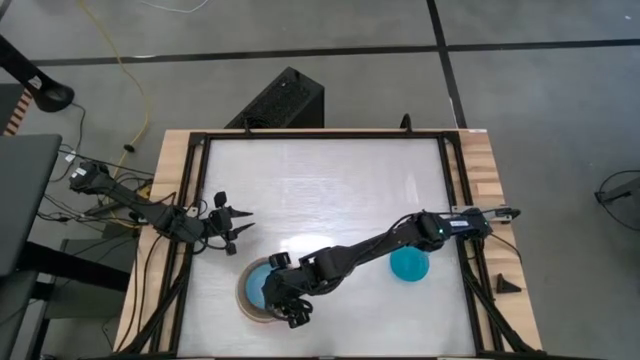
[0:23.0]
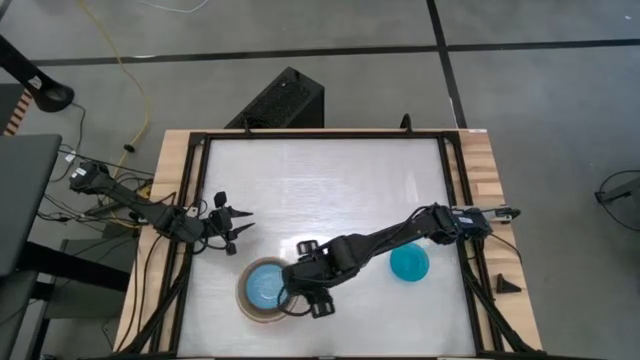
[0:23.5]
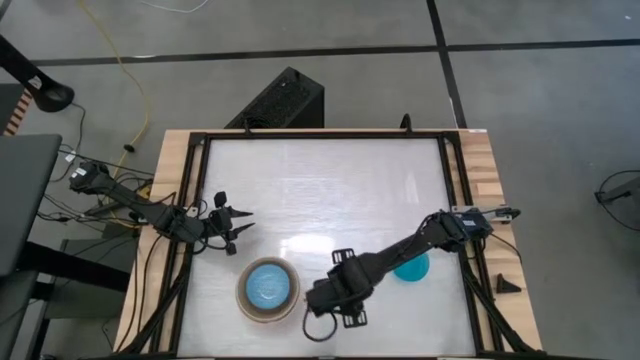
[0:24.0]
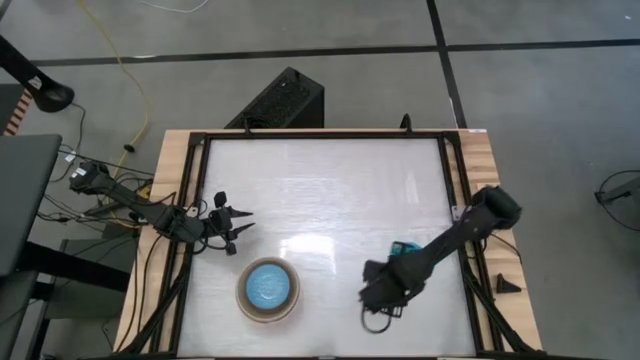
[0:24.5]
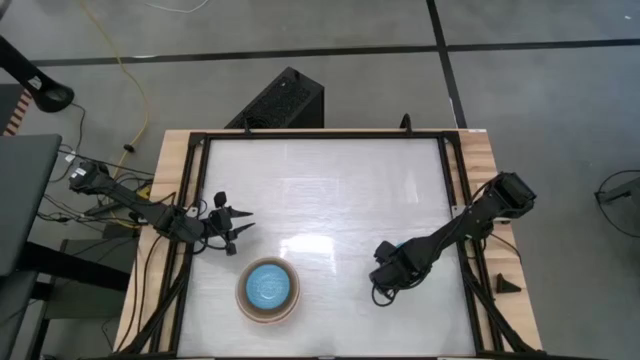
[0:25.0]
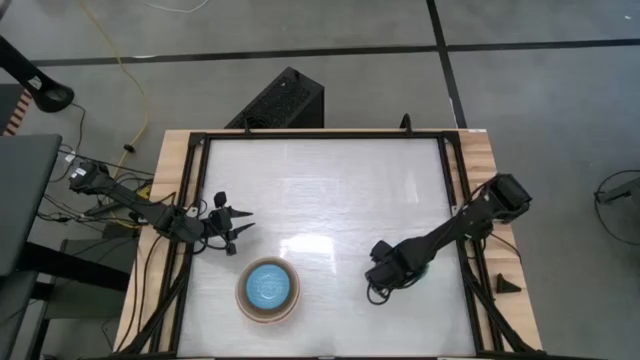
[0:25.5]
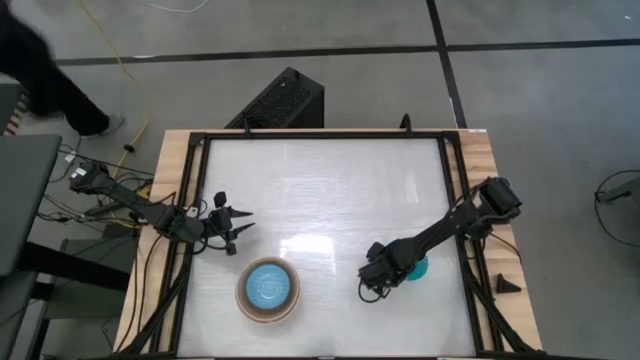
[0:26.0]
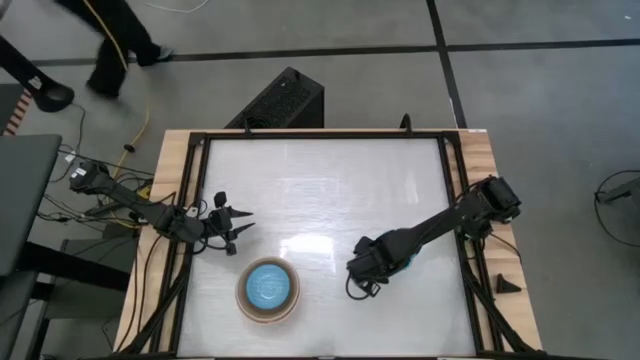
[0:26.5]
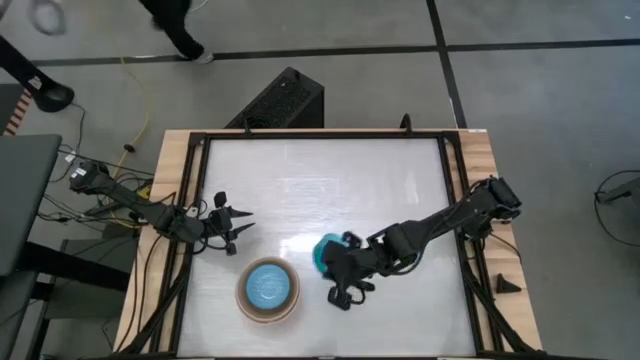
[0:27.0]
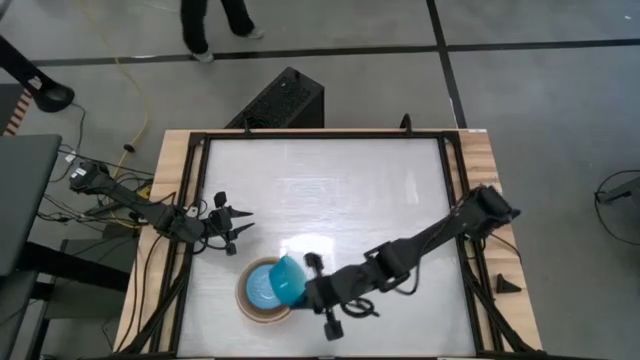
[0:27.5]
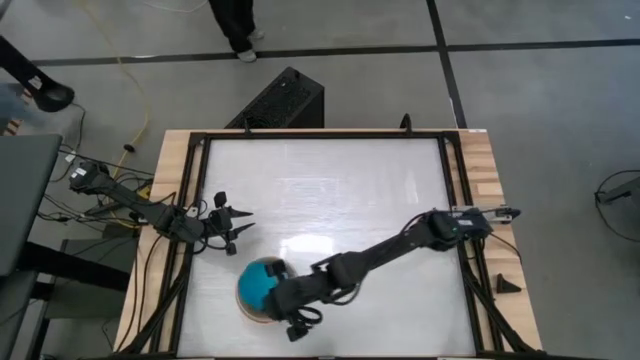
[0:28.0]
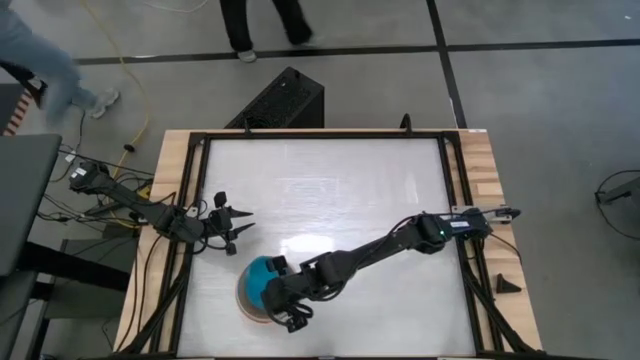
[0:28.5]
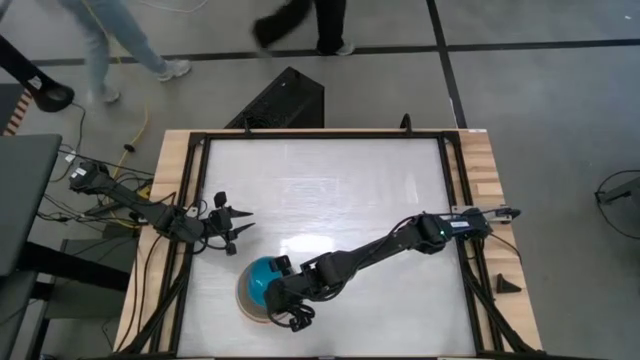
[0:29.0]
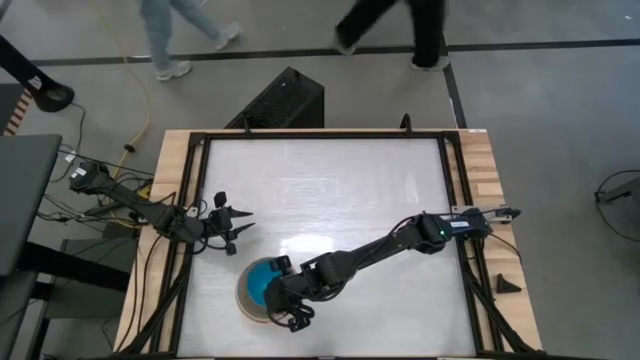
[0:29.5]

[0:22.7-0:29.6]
Stack the blue bowl on top of the blue pattern bowl

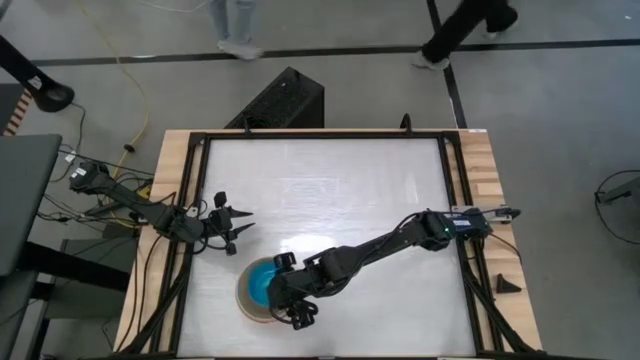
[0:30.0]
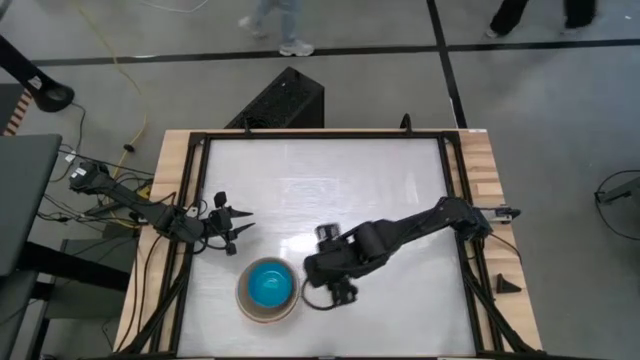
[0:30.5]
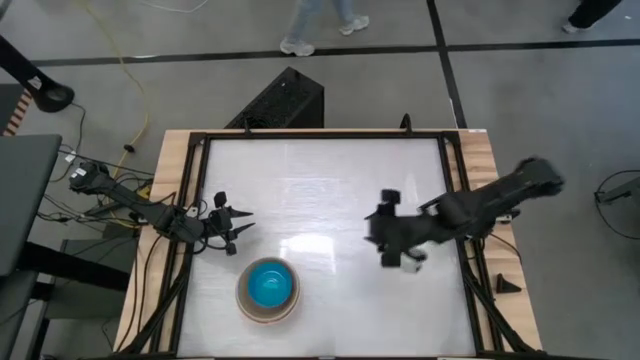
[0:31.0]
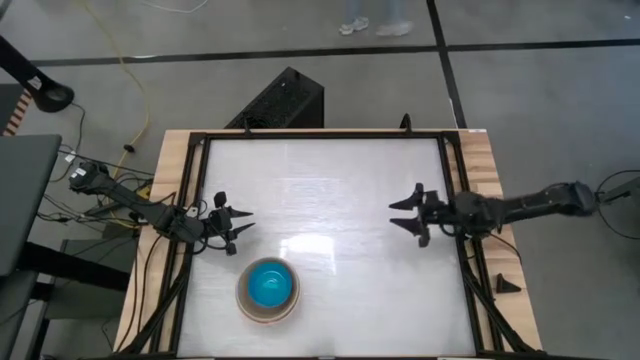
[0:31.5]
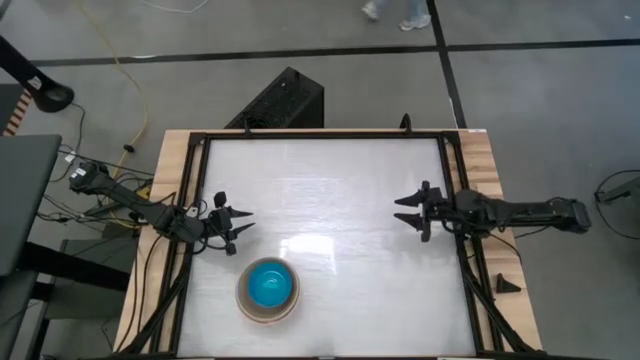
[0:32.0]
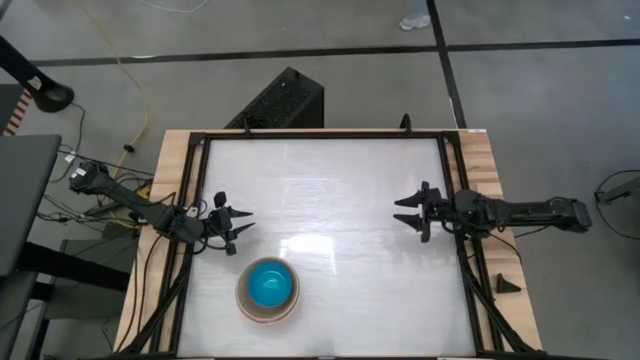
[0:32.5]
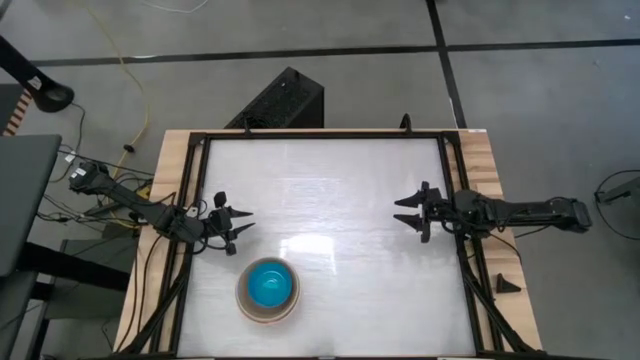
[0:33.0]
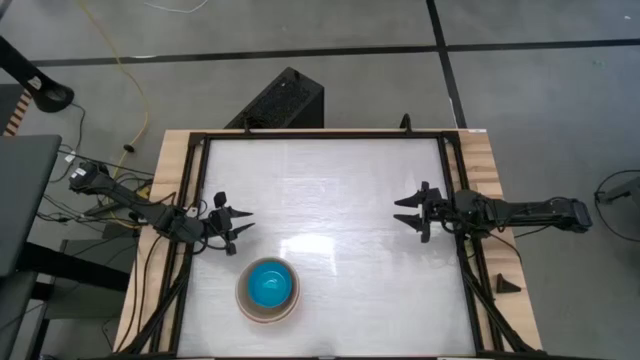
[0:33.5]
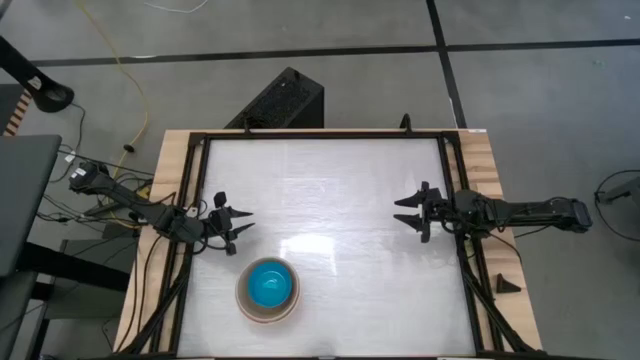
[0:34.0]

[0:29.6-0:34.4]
Return to Home Position

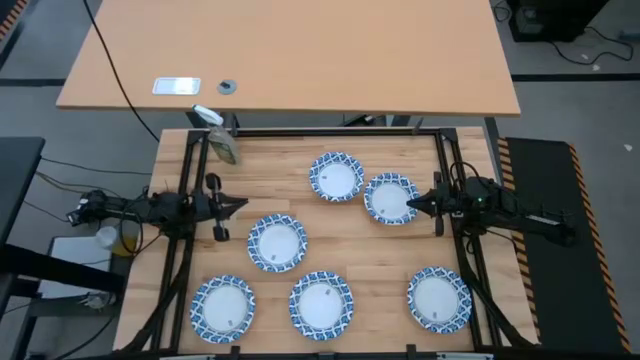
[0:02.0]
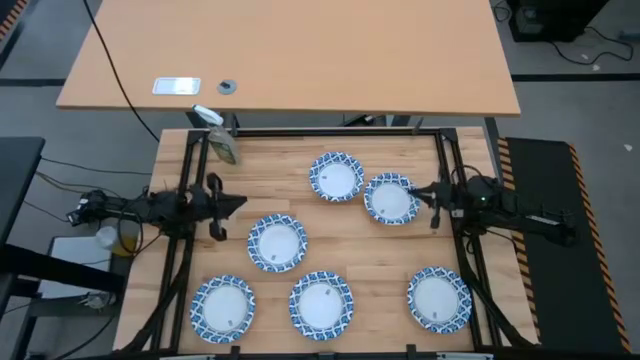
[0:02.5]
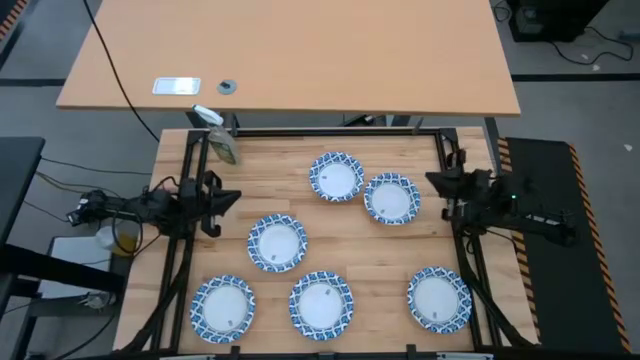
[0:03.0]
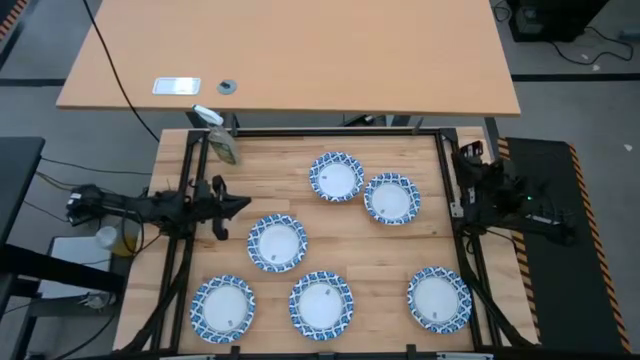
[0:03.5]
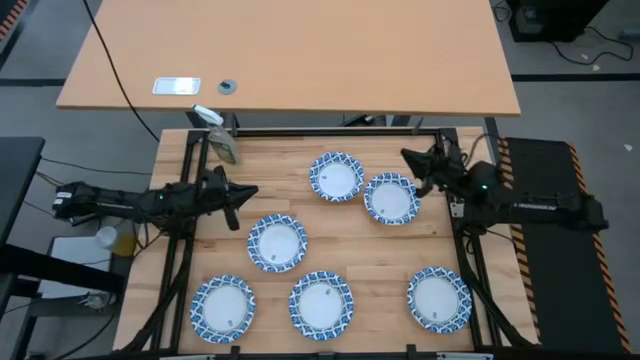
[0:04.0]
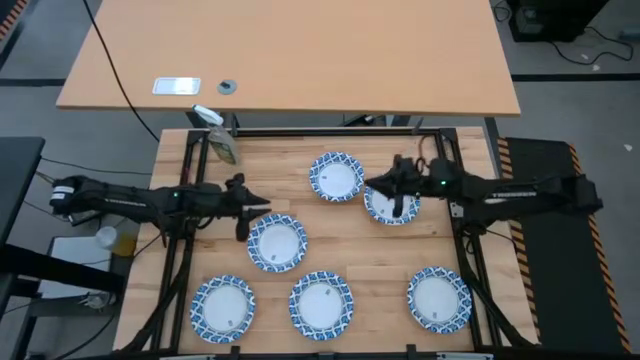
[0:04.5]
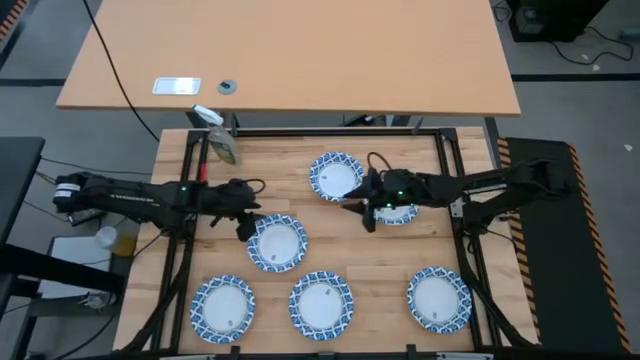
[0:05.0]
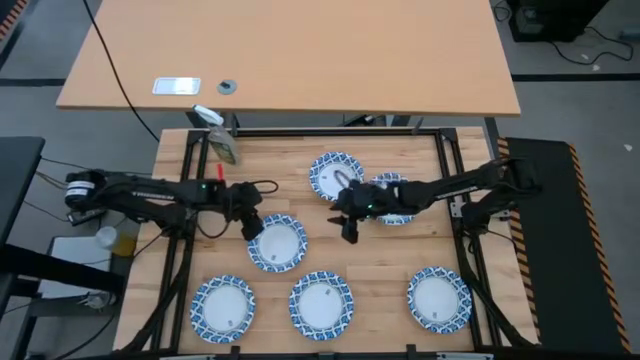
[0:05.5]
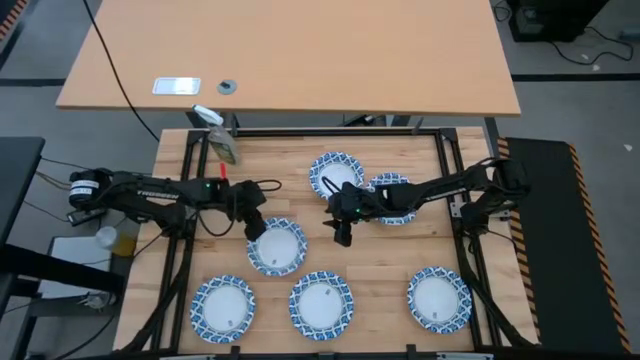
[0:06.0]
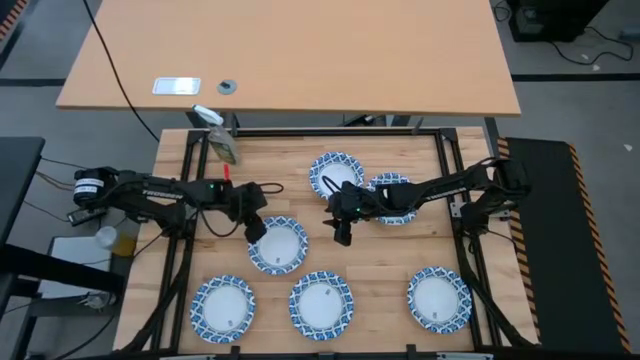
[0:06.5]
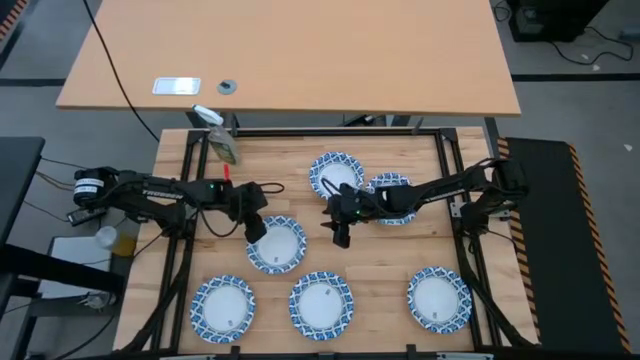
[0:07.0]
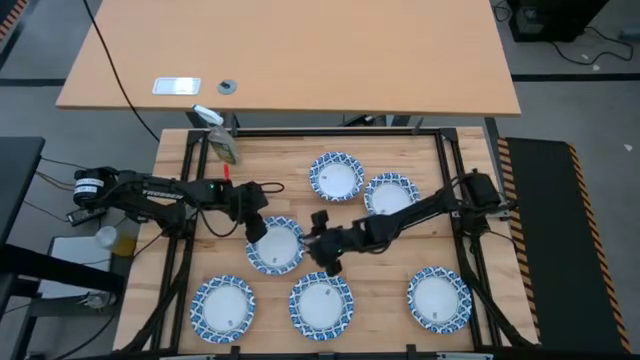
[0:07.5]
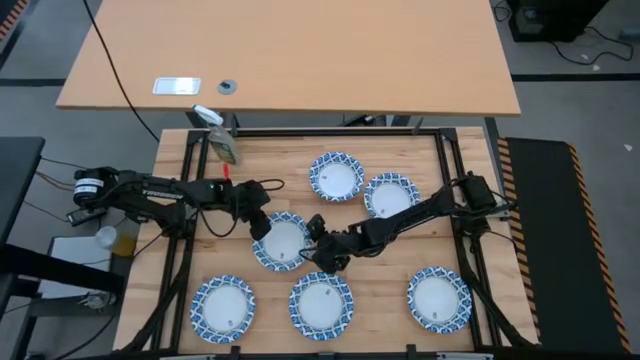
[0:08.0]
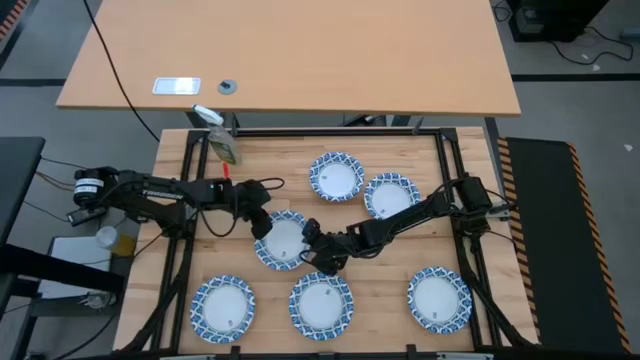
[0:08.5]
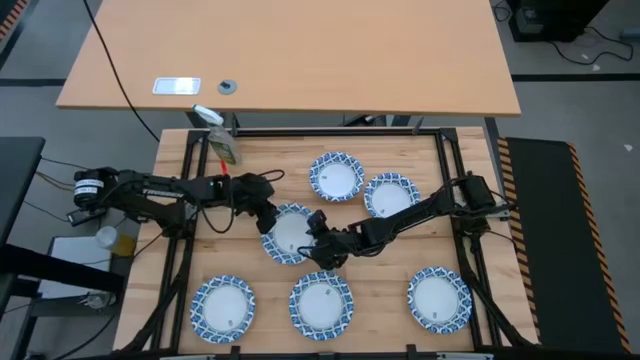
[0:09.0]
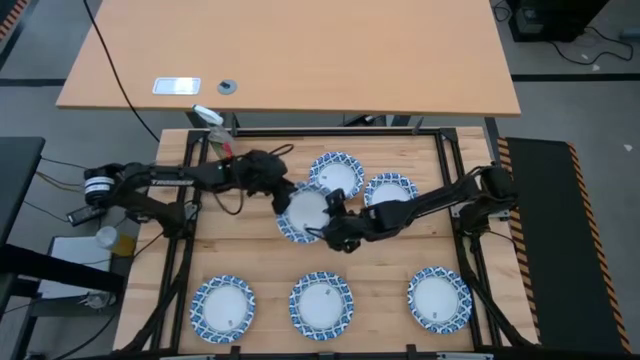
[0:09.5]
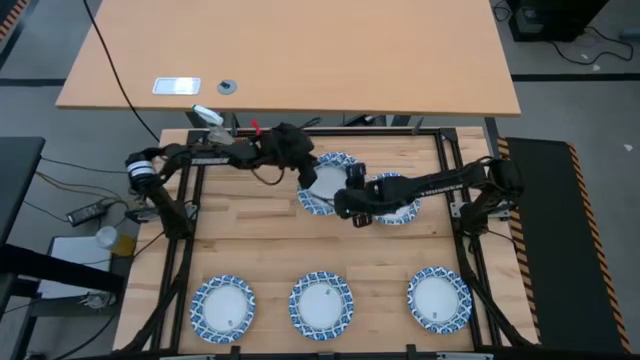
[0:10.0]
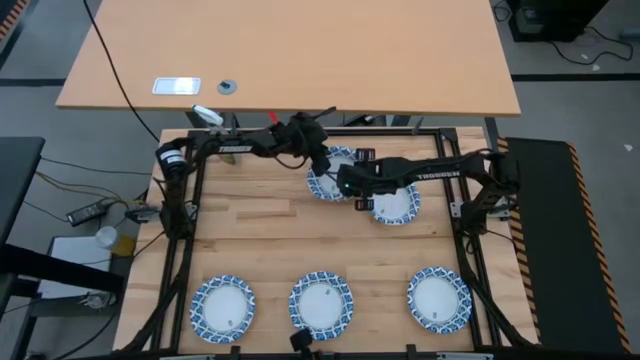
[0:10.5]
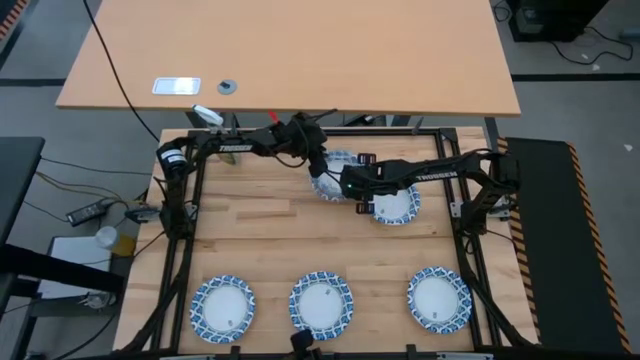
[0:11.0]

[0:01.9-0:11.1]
Stack the blue white patterned bowl on top of the blue white patterned bowl
